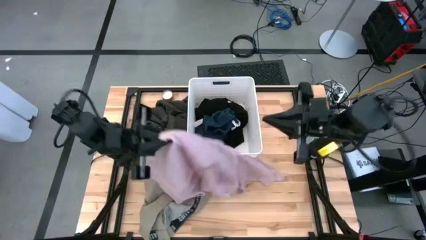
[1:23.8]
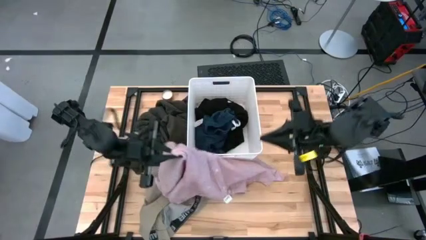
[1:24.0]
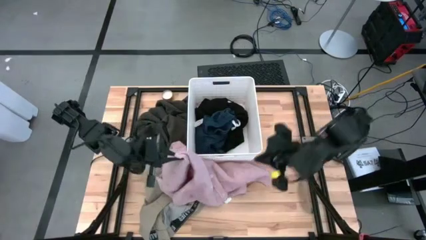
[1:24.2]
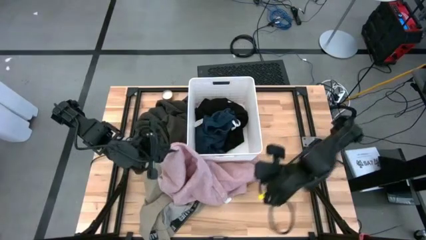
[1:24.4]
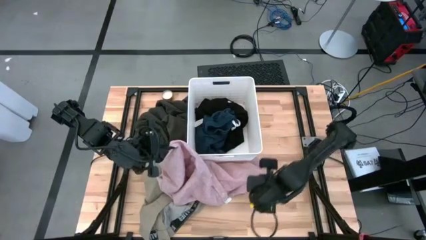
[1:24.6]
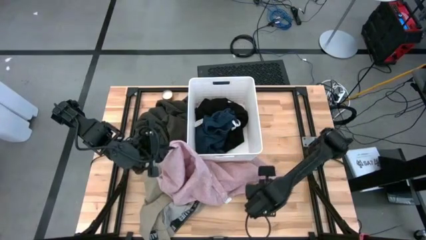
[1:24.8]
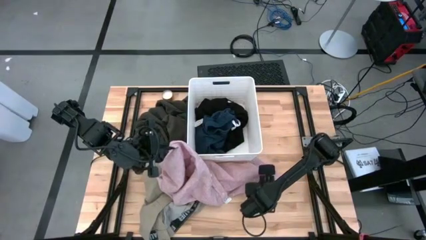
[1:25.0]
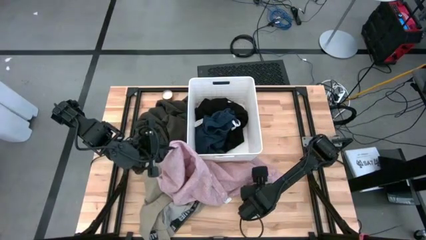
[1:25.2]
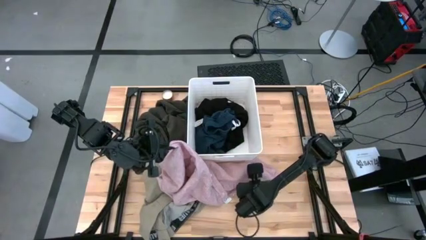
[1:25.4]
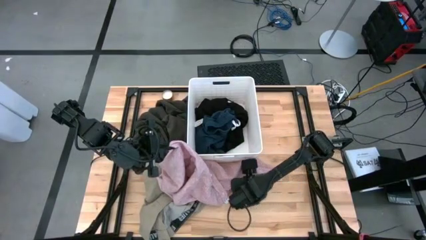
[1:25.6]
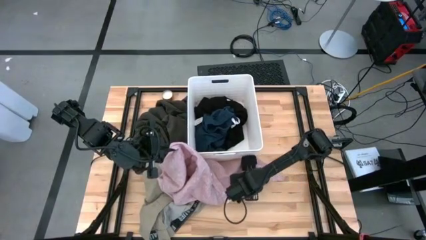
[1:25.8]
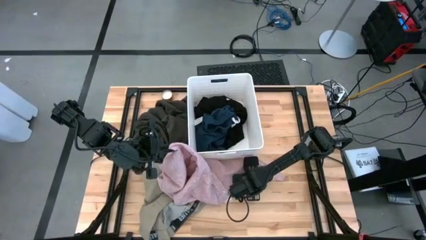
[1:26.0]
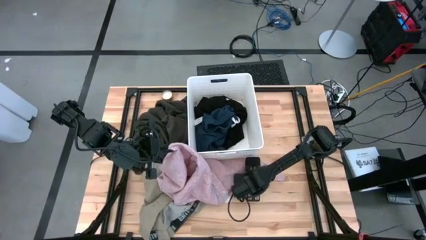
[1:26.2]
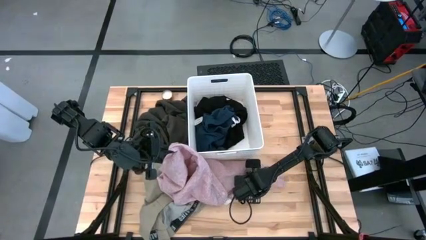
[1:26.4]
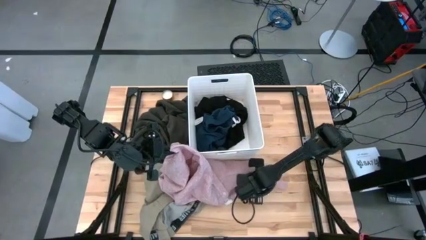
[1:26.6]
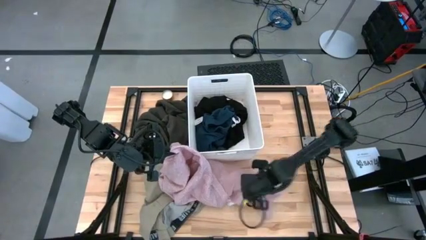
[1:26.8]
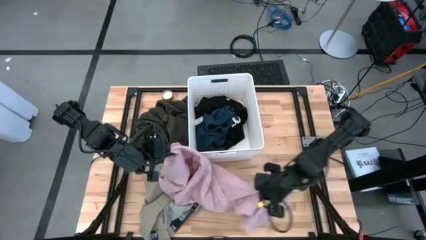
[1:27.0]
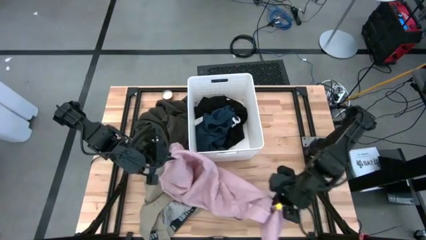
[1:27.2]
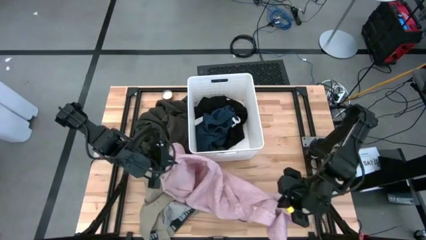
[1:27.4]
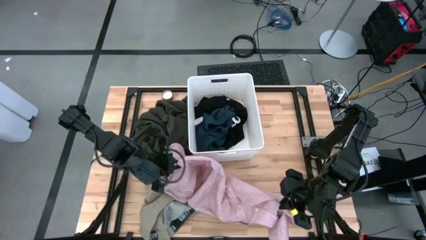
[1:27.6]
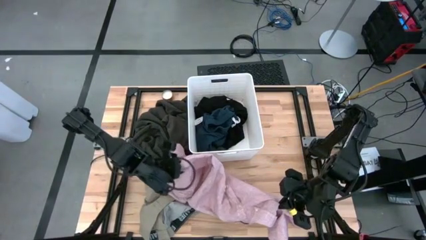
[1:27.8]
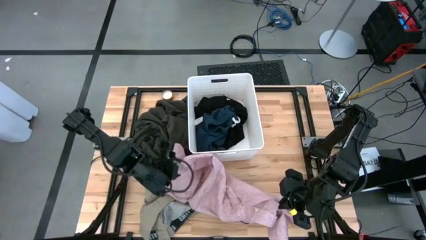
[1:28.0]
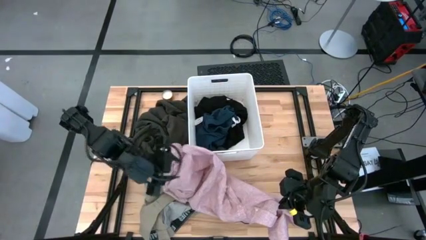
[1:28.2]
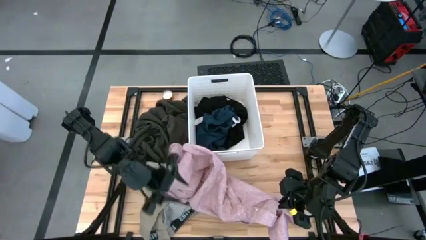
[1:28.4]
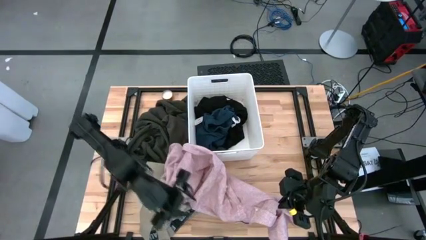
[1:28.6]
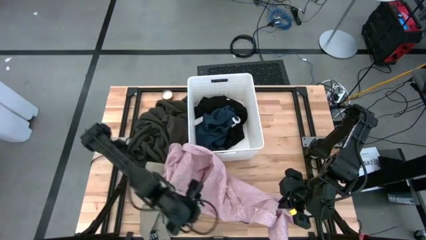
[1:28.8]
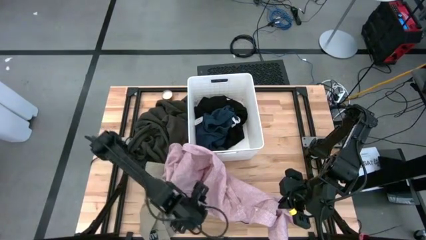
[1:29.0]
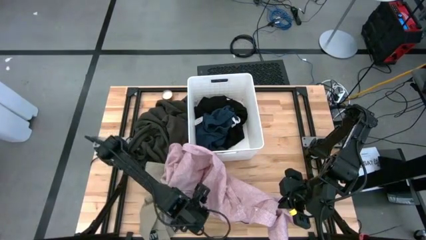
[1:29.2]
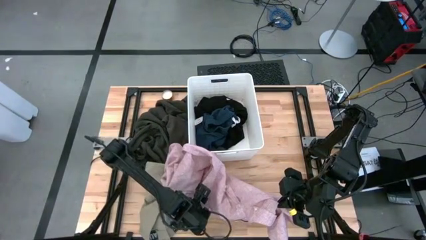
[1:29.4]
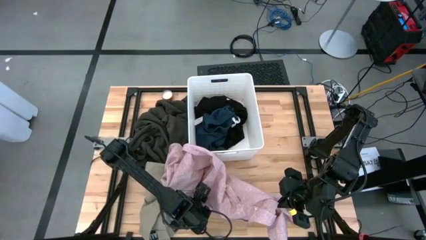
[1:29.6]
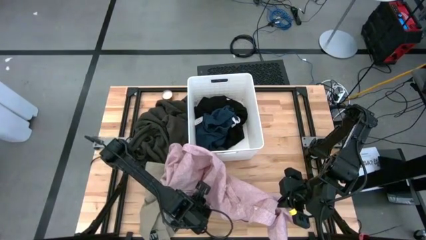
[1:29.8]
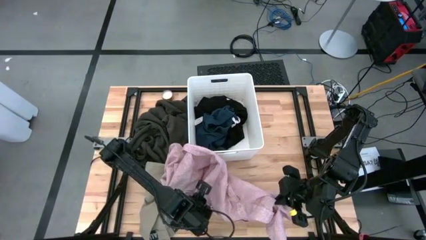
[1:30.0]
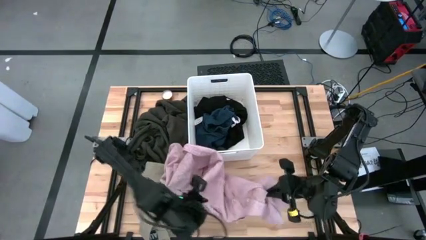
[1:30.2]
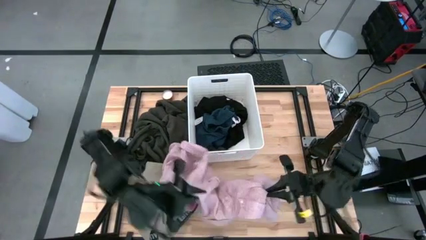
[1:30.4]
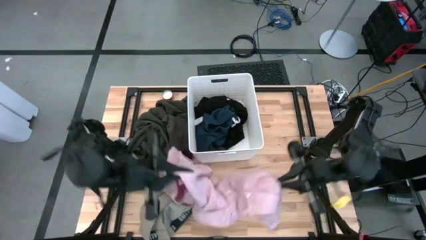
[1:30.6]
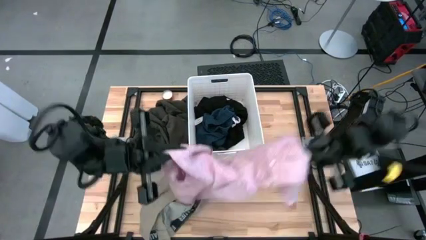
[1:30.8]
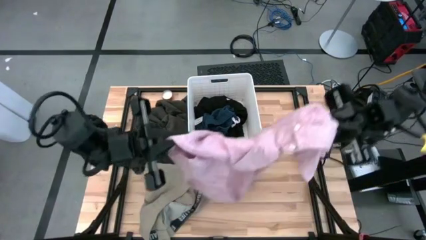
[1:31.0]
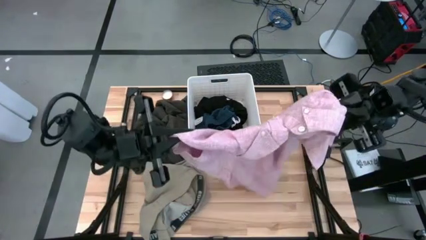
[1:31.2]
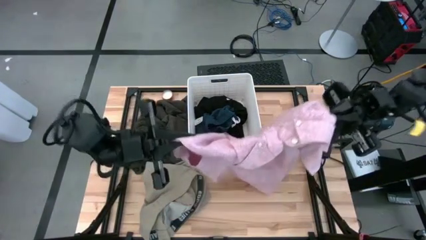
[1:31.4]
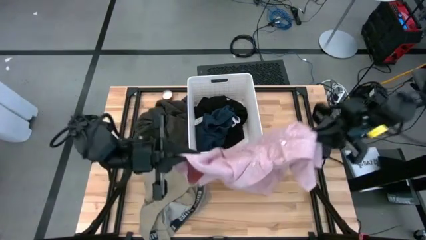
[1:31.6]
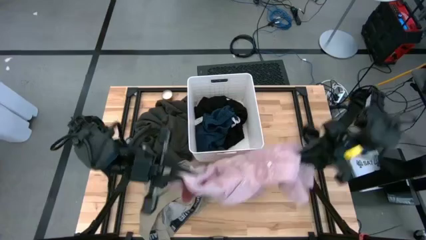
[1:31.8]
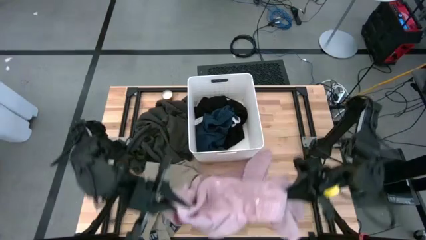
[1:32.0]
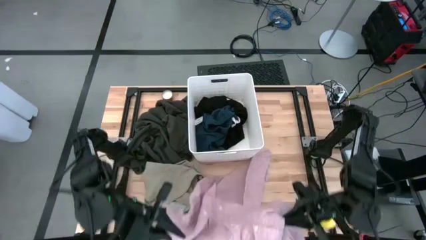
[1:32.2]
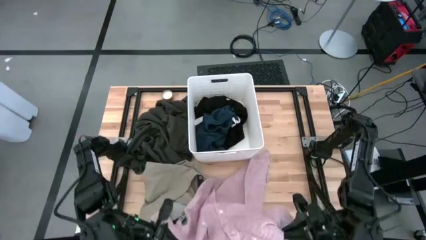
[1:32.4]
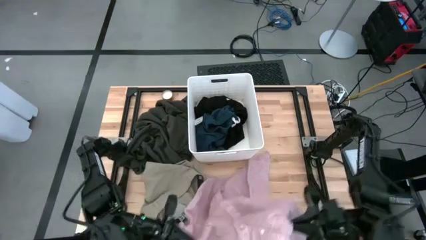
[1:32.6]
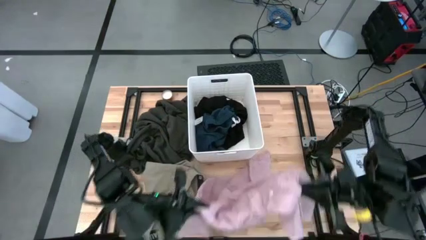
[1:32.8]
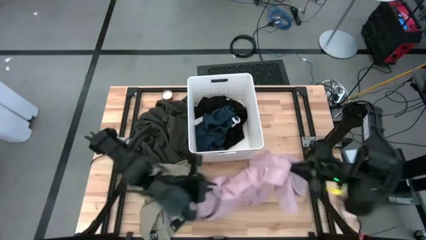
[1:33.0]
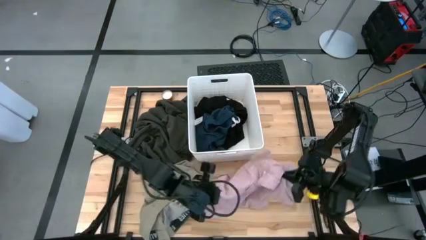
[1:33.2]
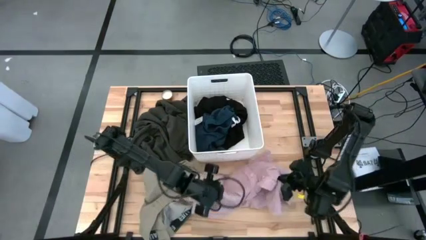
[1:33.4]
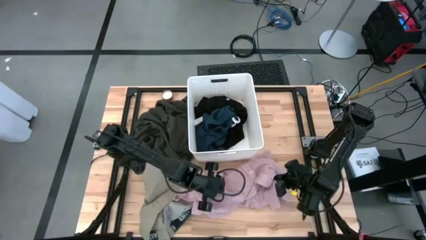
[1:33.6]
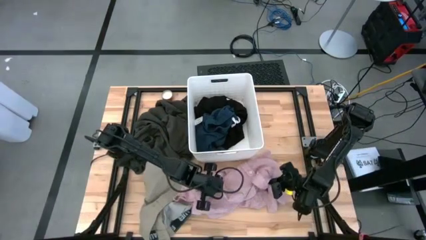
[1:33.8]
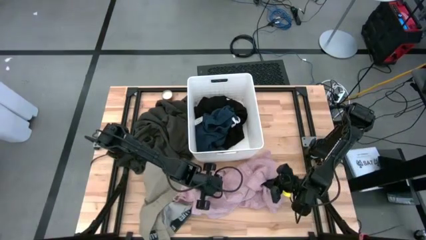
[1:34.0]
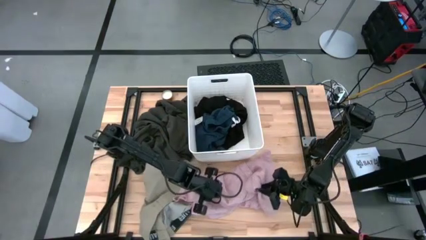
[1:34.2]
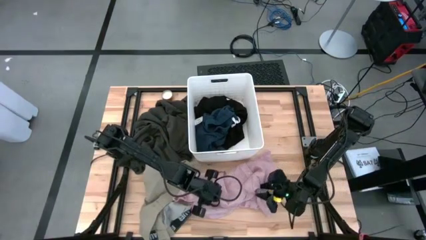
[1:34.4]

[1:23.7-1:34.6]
Task: Sort clothes
Put the pink polo into the laundry bin

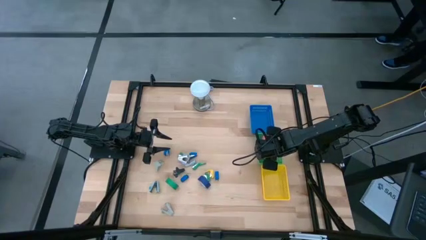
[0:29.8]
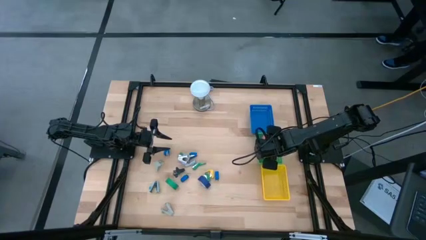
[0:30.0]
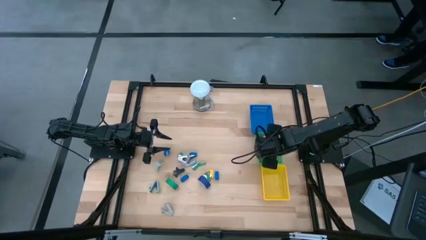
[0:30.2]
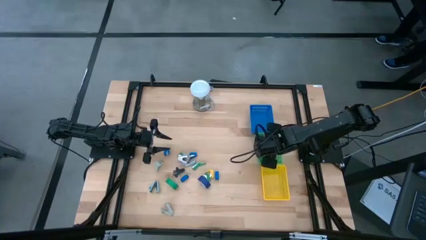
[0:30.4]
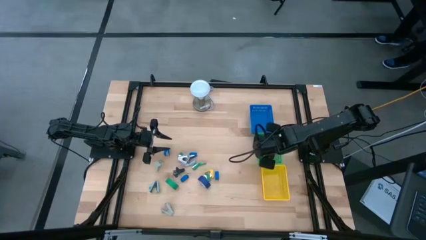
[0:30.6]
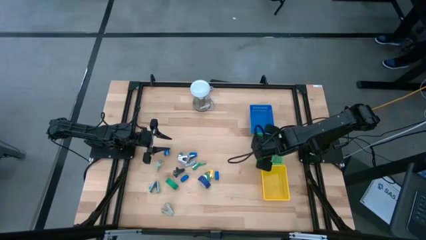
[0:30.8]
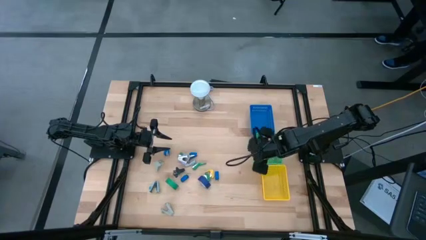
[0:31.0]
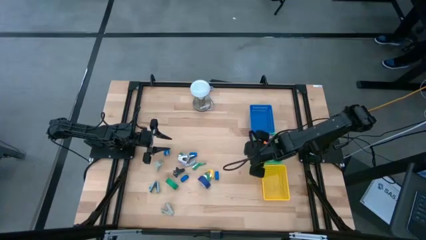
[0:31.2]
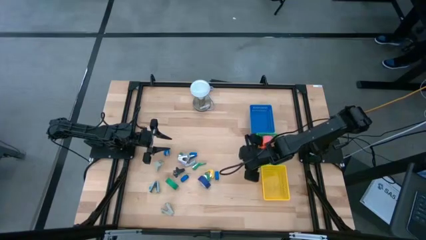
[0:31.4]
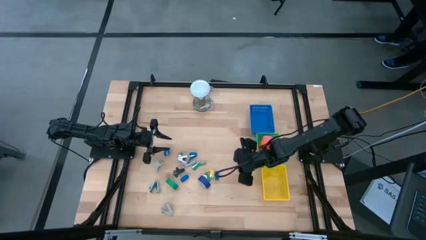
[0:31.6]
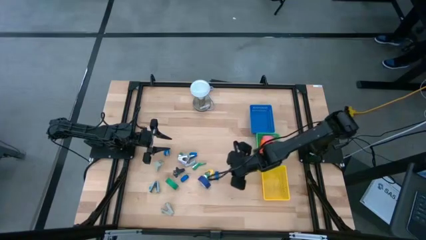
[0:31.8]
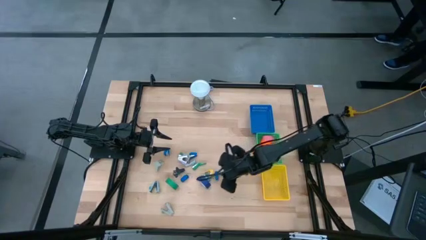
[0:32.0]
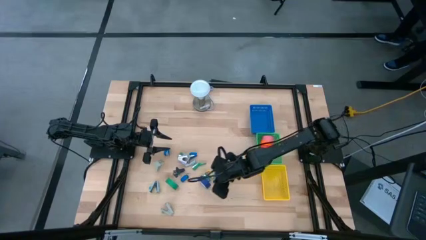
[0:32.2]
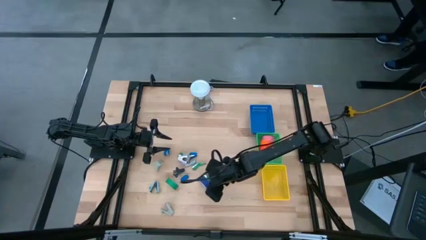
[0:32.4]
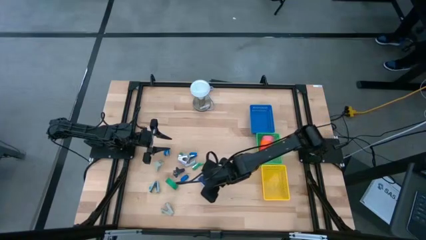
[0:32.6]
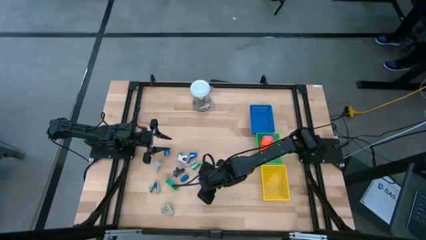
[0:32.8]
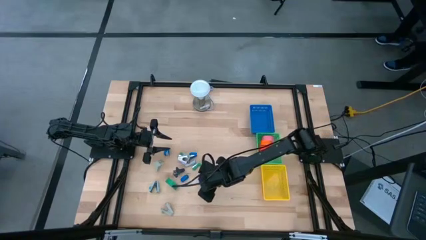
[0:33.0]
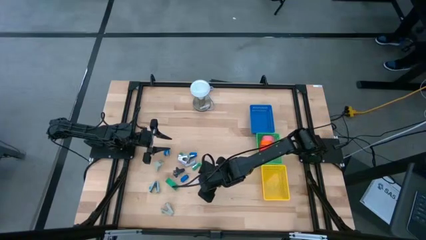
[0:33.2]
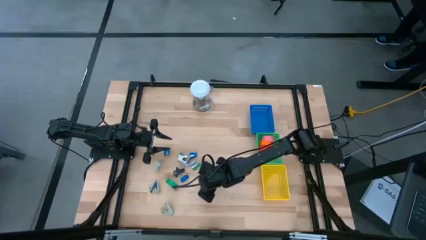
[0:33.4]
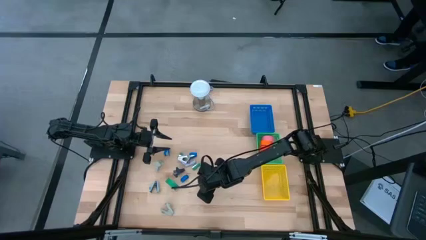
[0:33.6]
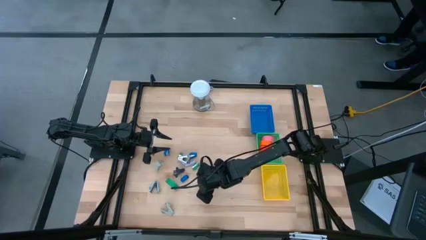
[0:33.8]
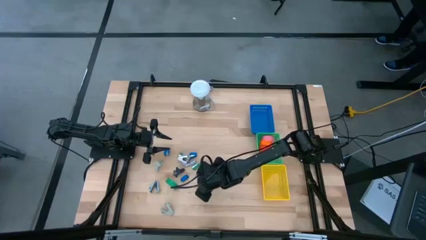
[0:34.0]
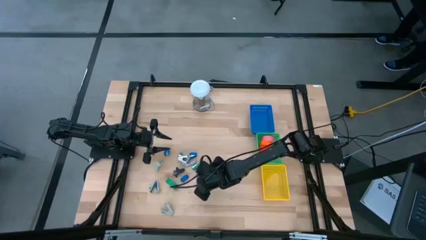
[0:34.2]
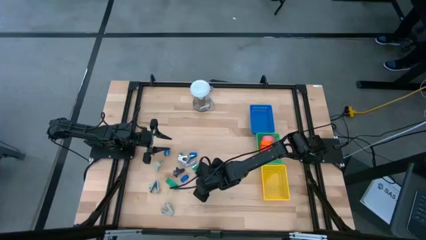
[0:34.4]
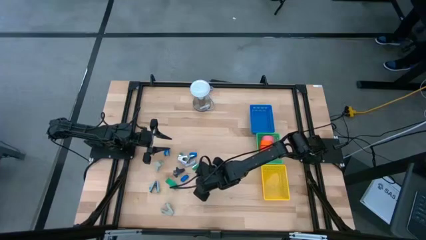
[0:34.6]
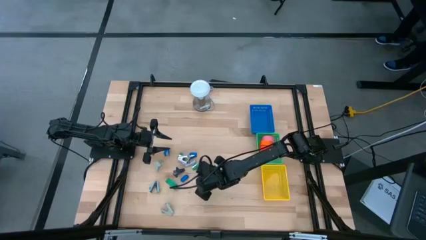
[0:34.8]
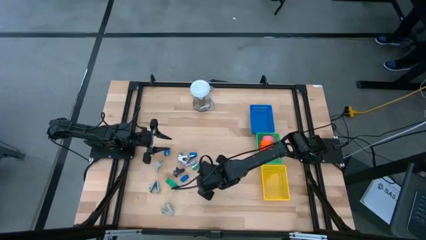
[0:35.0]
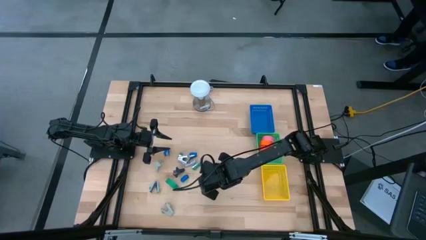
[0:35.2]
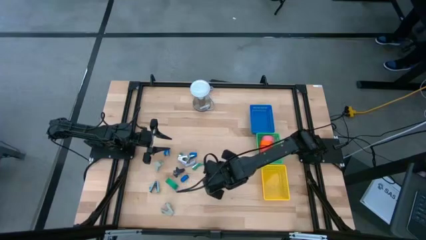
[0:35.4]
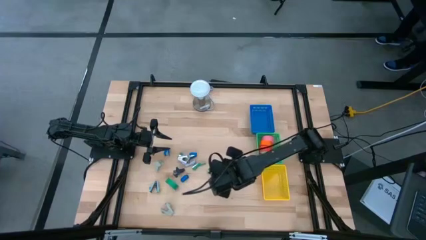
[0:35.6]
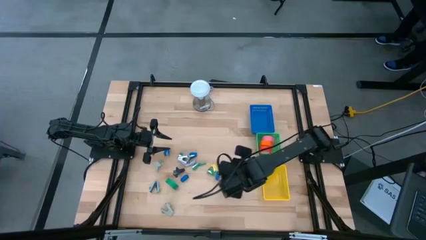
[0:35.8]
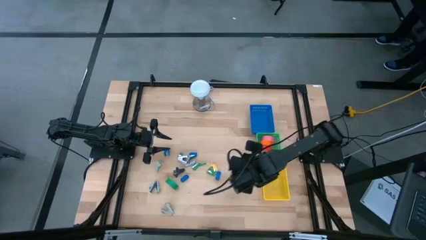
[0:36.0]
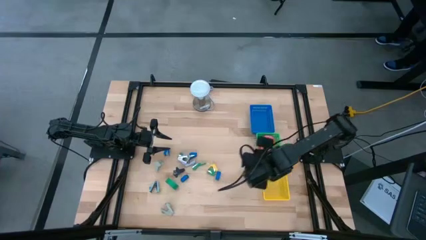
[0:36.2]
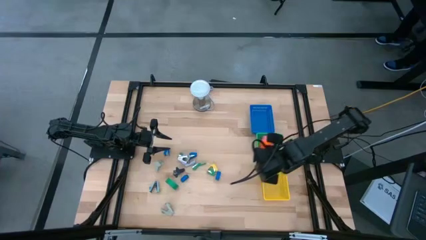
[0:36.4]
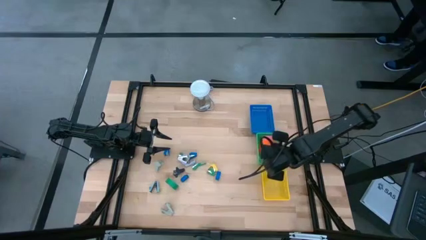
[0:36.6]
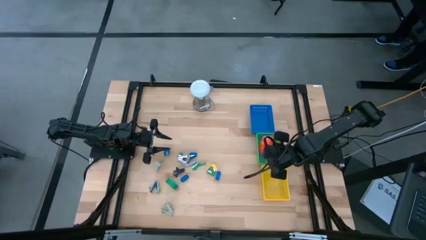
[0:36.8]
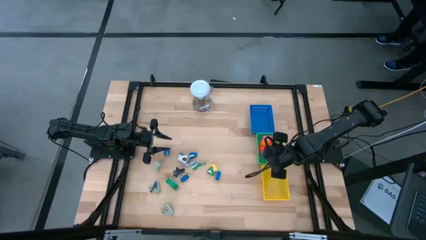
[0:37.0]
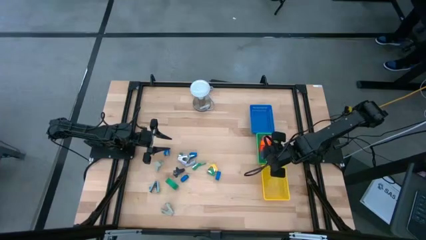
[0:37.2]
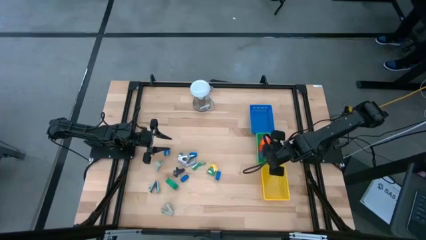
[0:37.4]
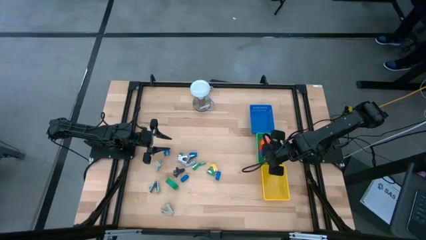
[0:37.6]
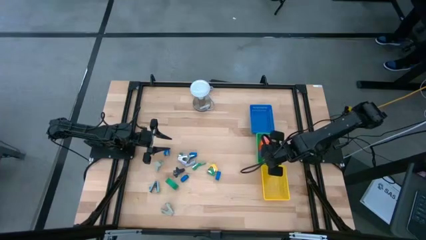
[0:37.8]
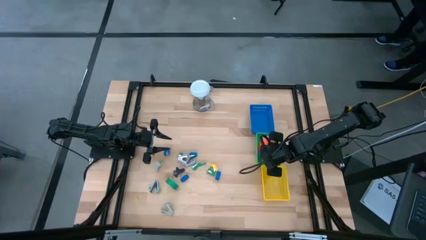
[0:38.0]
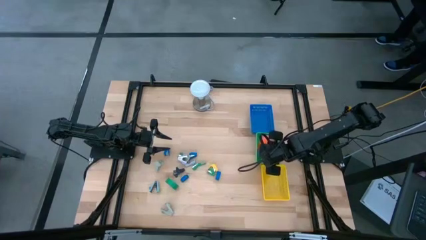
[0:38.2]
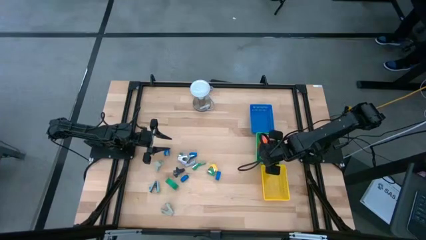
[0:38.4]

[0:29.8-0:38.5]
Task: Pick and place Stapler, Stapler remover, tape
Put the blue tape into the green bin
